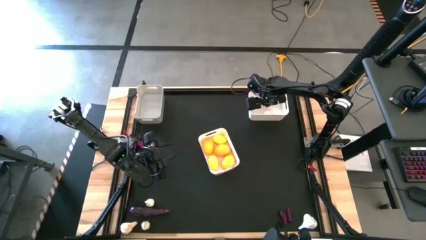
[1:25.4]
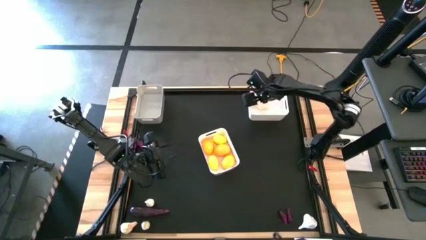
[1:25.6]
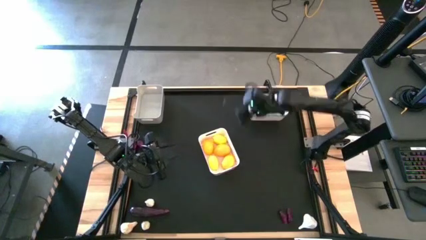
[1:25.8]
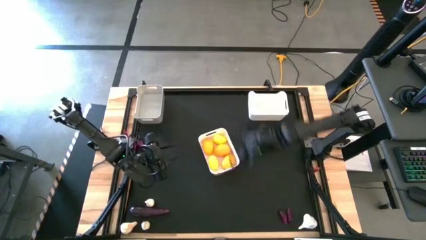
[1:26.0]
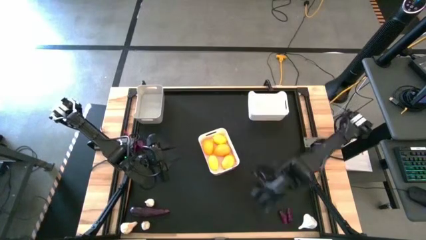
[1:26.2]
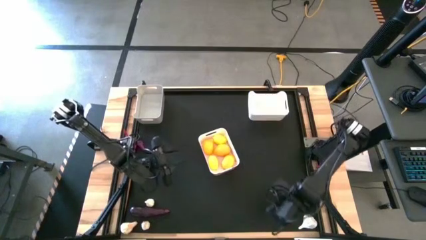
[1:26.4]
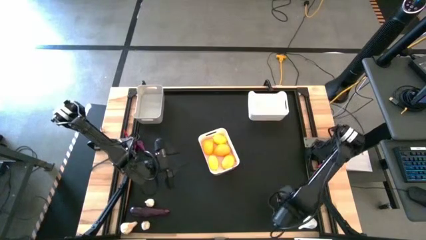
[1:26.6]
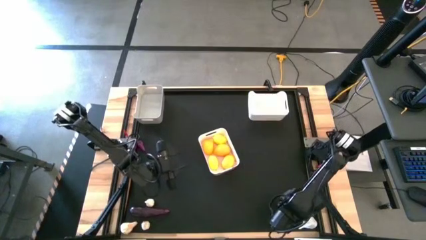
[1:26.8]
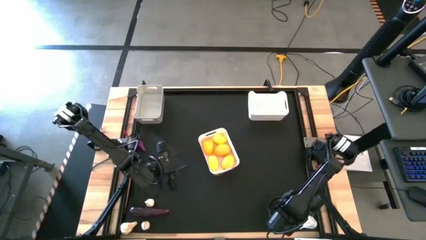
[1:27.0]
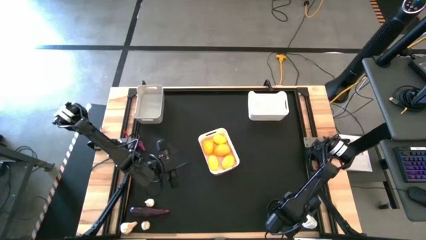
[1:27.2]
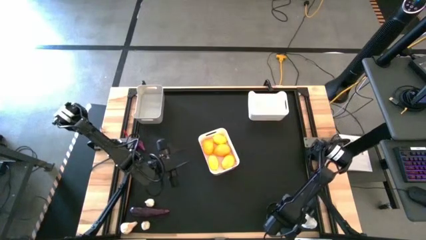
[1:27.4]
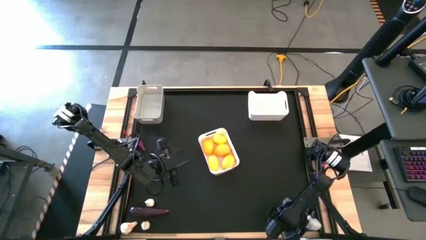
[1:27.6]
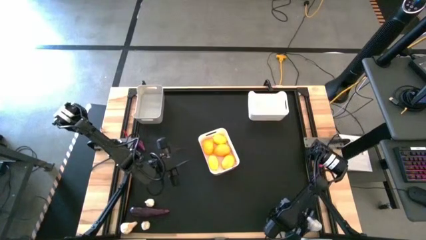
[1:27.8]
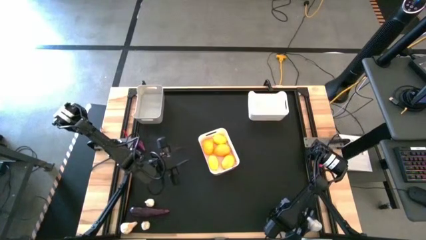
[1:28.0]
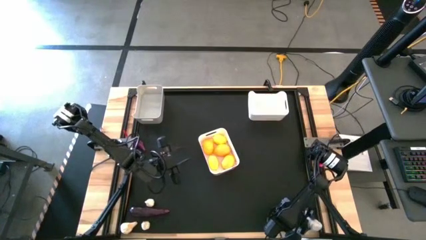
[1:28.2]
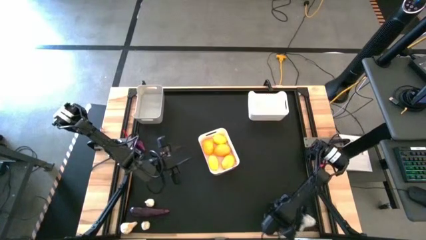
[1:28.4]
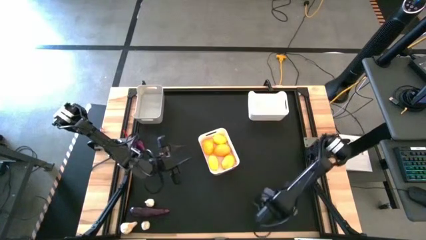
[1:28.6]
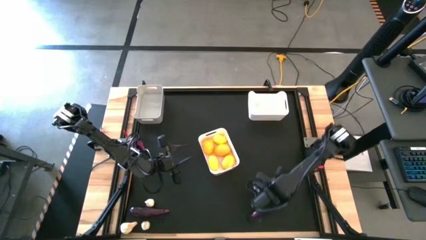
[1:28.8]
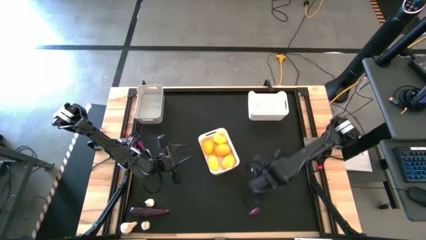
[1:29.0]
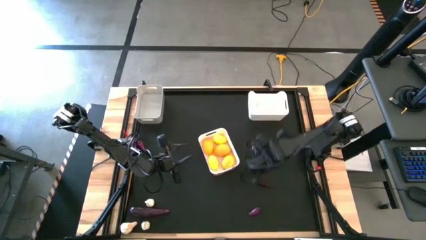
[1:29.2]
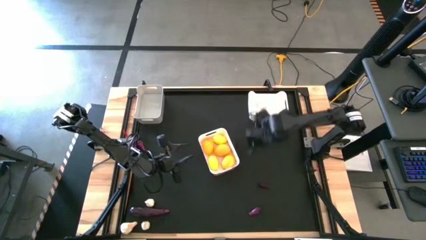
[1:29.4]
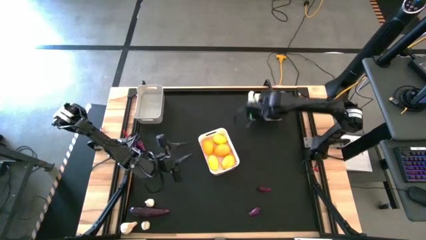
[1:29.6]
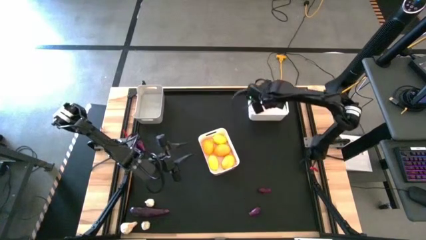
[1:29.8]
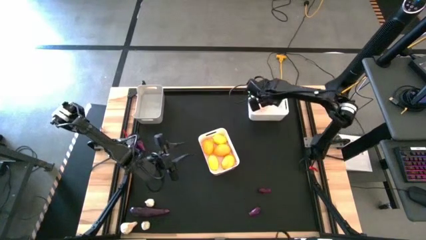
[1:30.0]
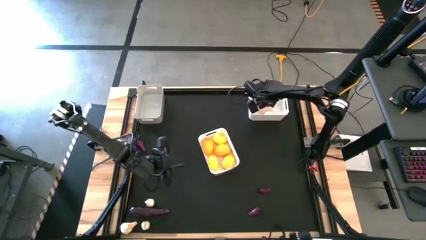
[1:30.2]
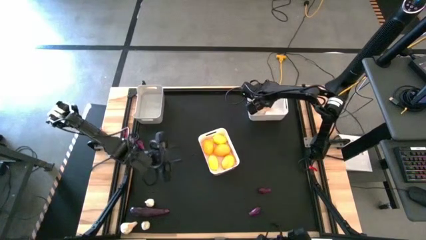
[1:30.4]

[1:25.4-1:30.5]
Task: Sort produce into baskets
Put the garlic into the top white bin

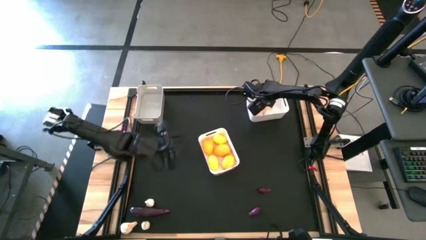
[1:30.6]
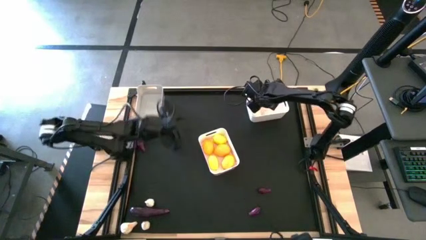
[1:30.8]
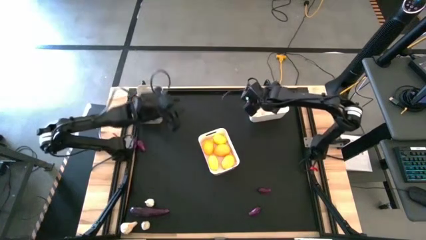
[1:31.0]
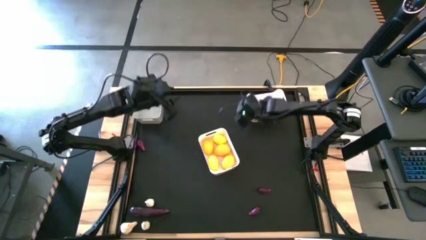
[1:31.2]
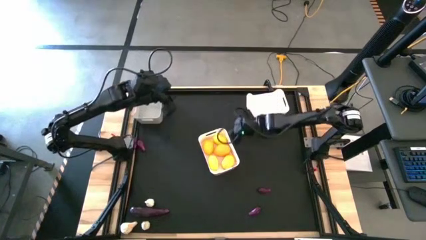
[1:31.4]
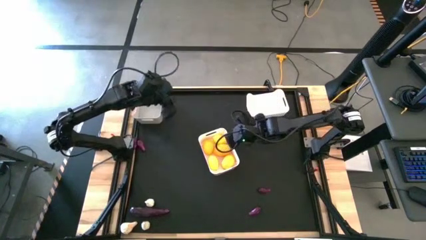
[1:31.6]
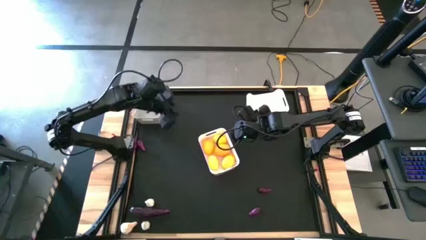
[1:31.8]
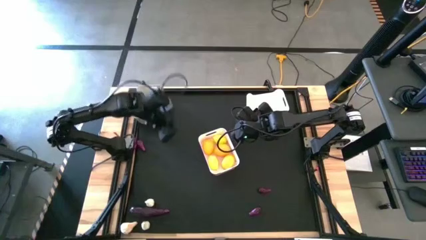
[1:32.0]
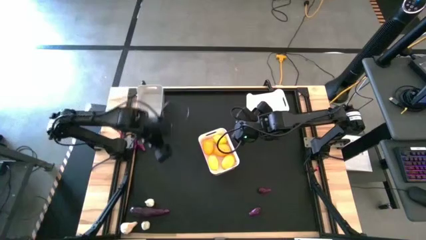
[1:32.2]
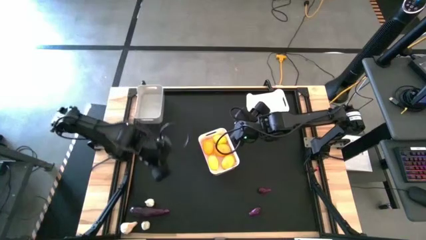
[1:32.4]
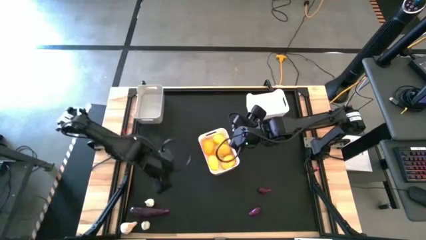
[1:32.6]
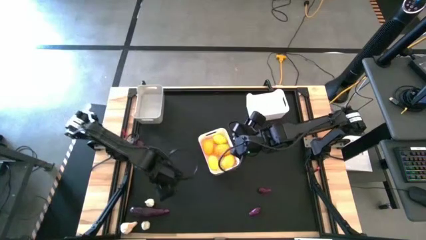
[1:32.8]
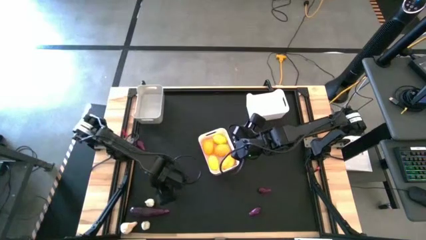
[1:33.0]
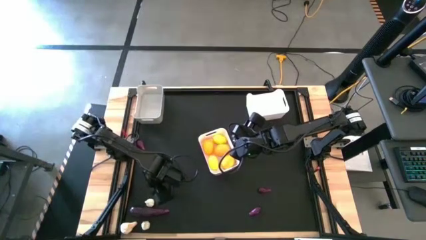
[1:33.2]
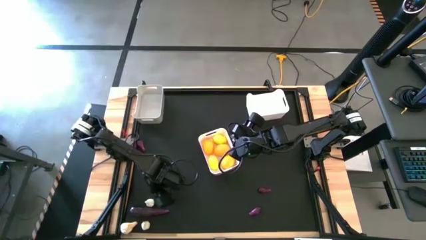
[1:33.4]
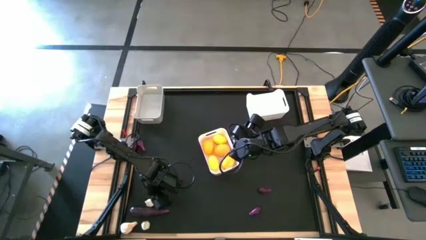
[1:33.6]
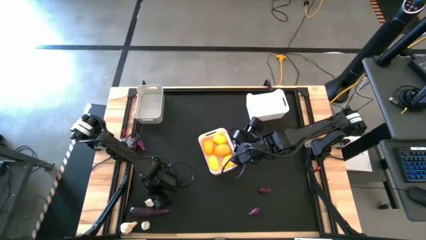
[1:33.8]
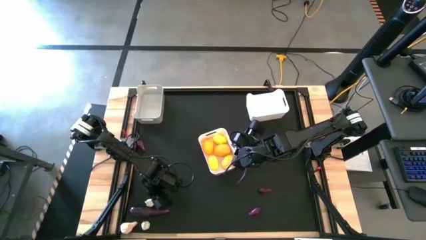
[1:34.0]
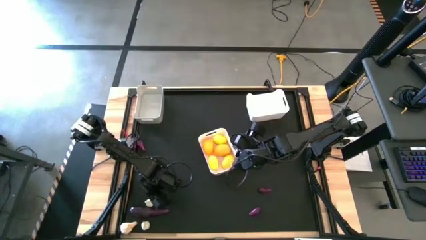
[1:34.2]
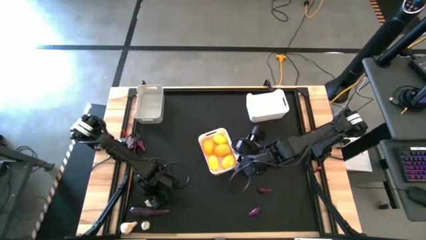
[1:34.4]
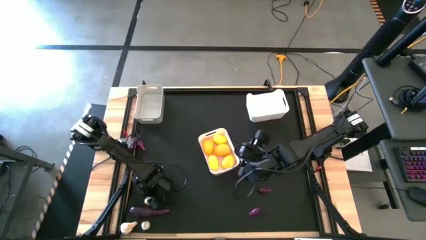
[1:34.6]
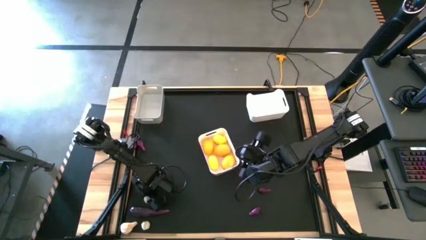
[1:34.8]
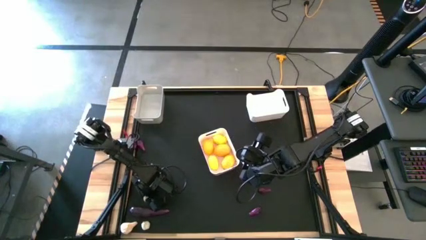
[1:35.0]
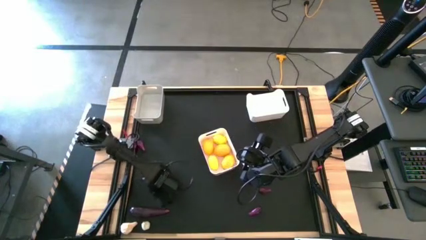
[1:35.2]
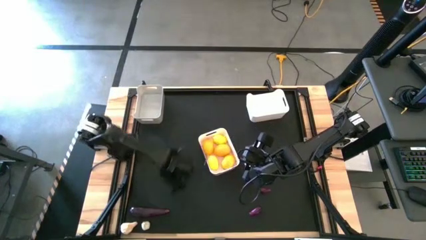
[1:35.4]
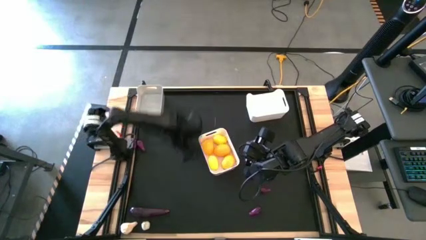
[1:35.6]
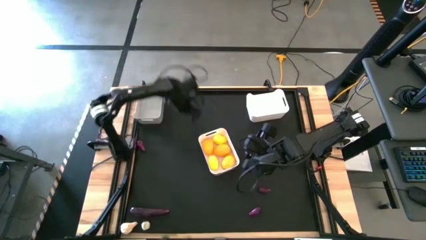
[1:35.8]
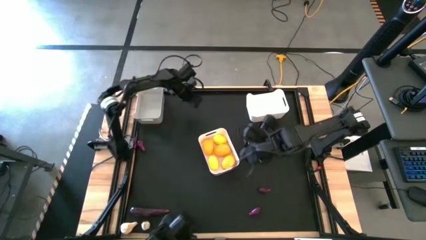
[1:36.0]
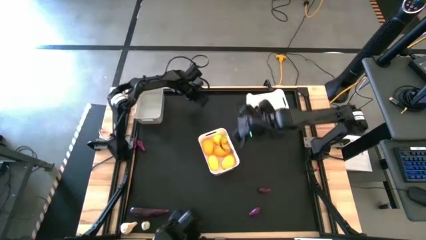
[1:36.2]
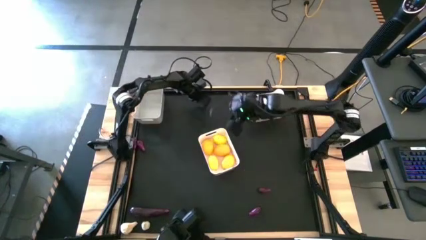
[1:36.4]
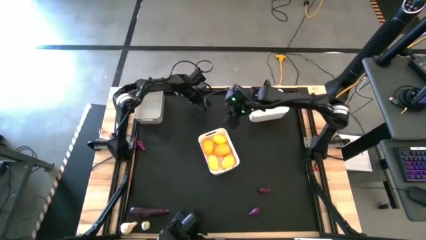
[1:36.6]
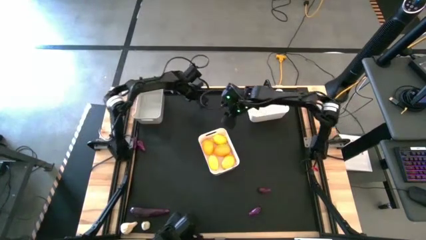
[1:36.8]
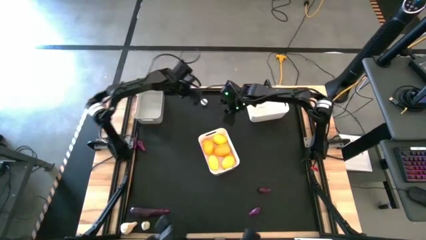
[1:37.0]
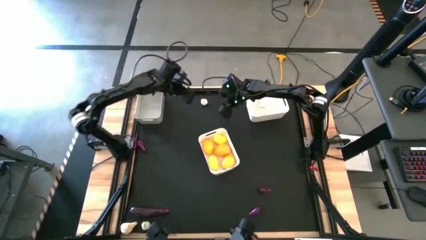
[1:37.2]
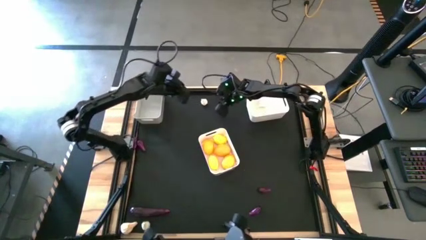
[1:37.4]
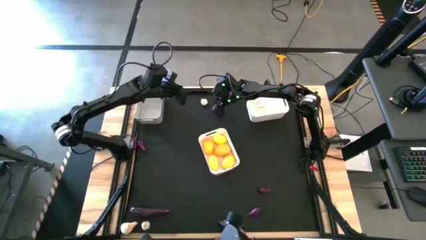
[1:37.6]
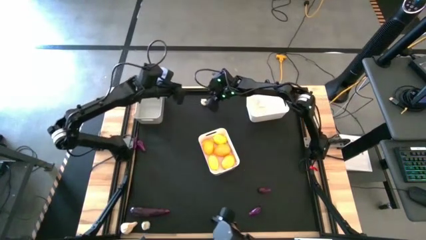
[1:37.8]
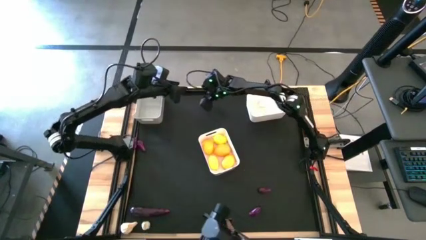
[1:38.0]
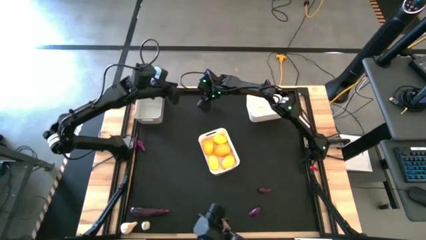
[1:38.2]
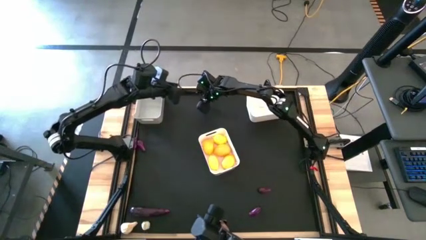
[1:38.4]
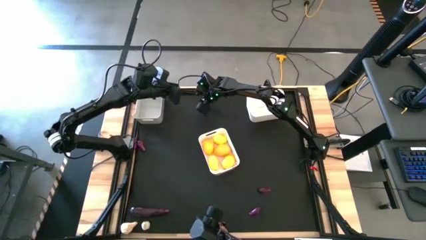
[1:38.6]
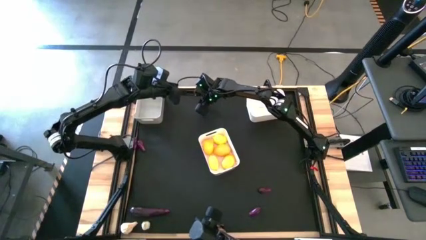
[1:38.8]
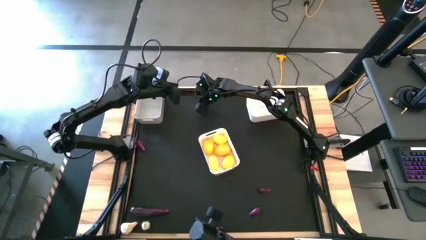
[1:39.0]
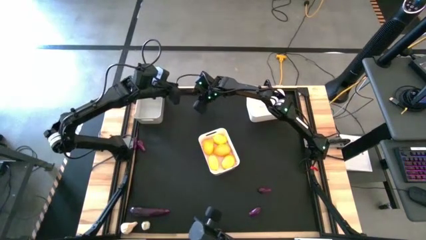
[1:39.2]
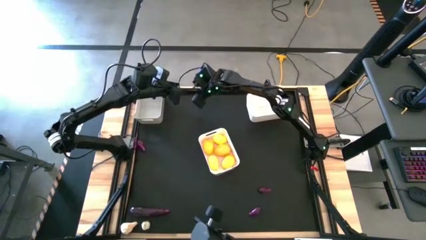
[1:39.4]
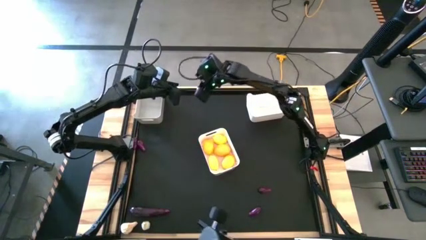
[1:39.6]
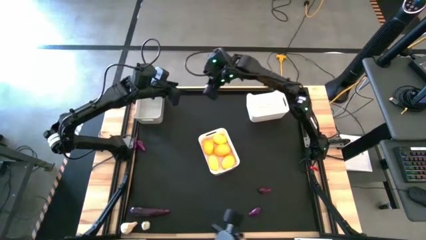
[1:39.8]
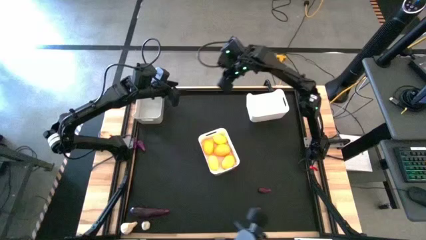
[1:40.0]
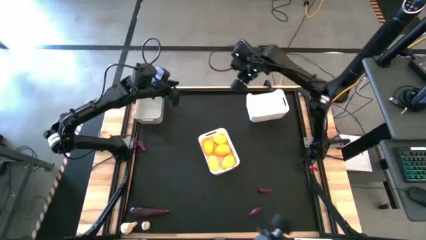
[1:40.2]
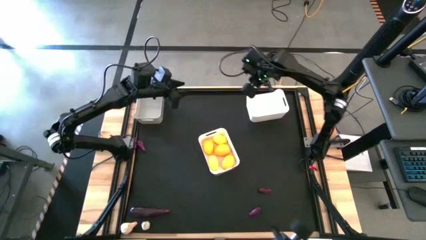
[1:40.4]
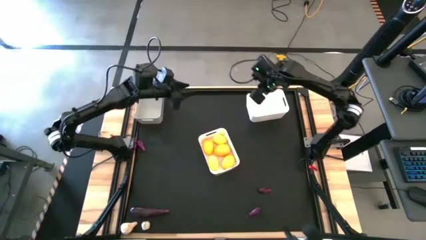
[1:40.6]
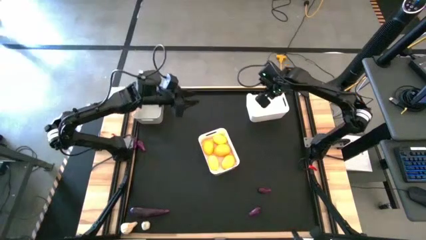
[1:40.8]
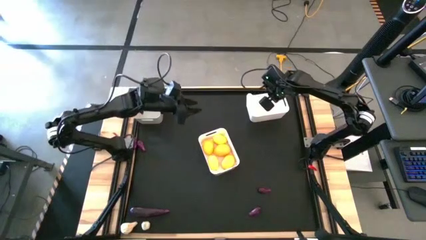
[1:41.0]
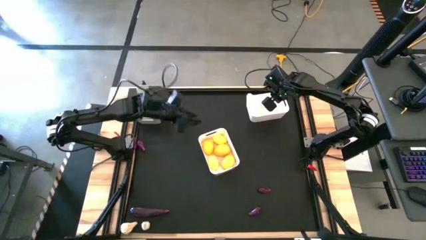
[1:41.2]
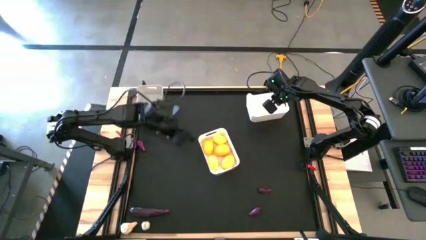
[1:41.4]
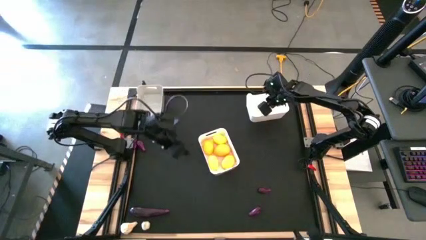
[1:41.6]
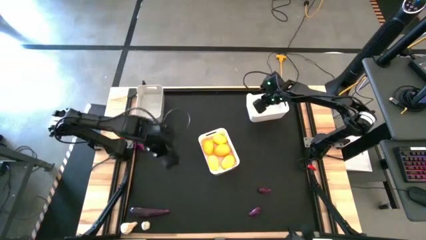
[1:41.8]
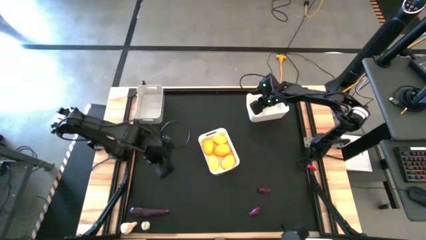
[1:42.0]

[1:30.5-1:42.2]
Put the garlic into the top white bin
